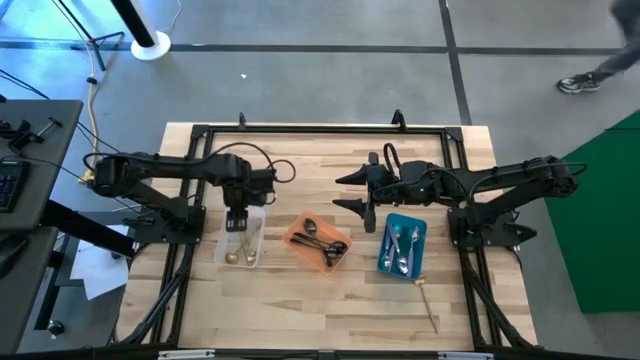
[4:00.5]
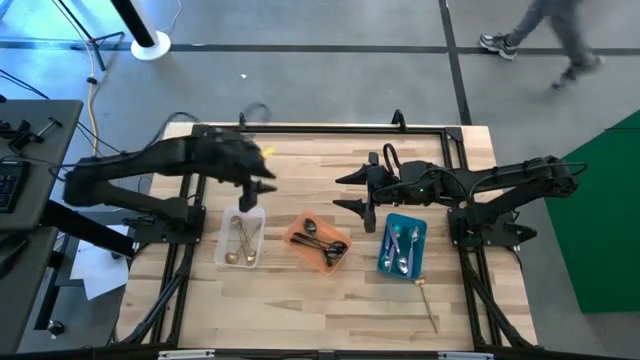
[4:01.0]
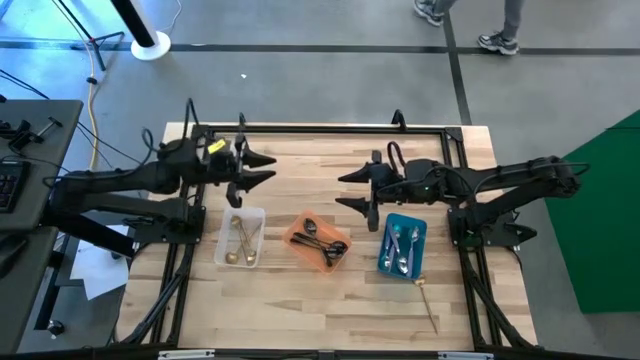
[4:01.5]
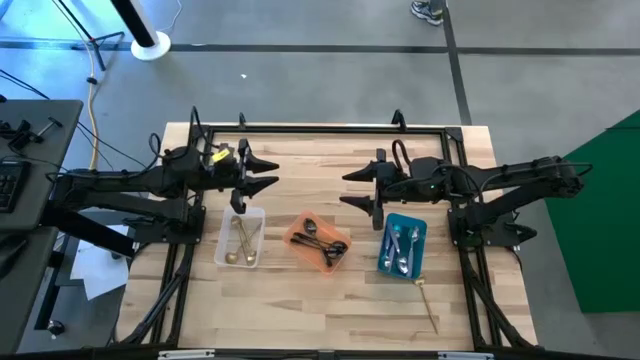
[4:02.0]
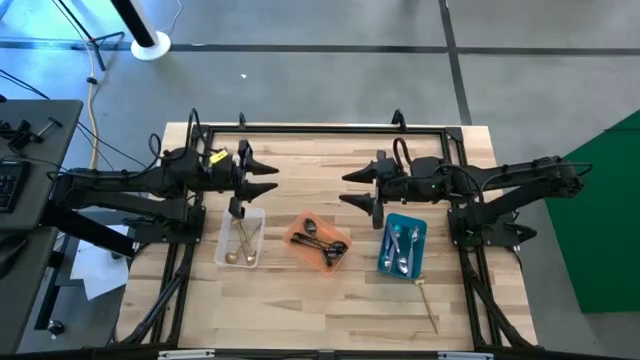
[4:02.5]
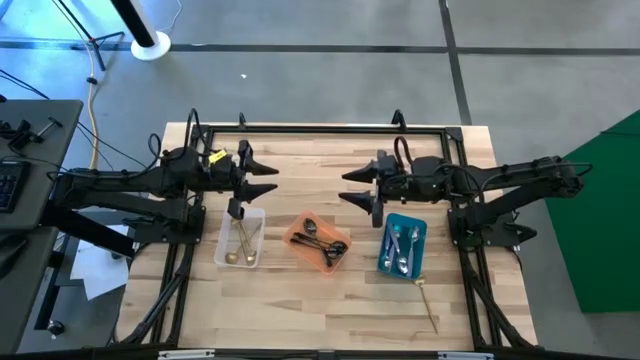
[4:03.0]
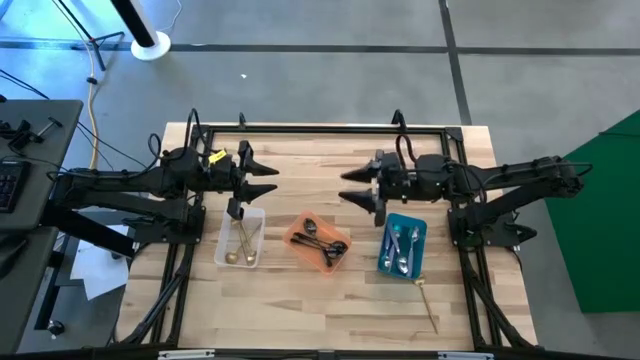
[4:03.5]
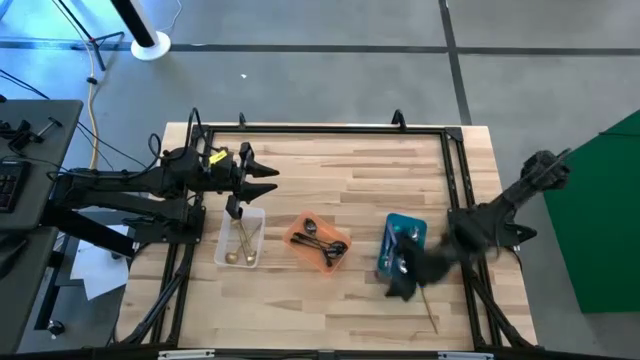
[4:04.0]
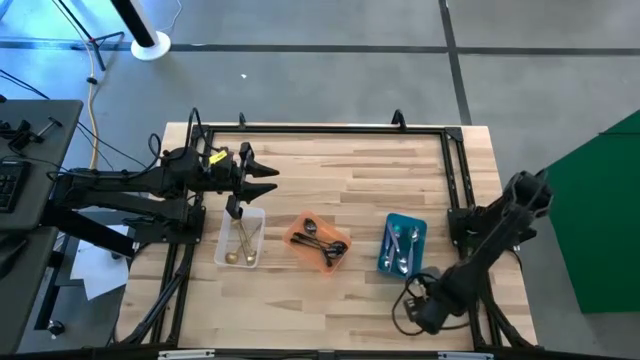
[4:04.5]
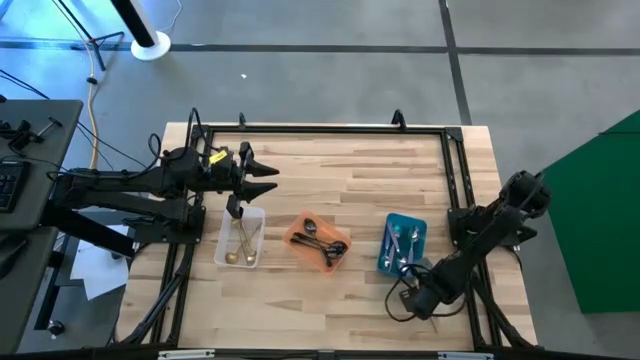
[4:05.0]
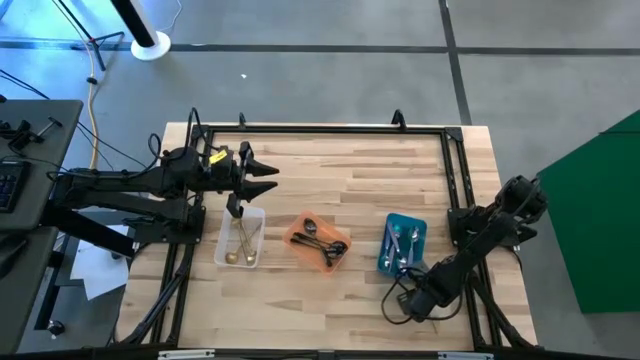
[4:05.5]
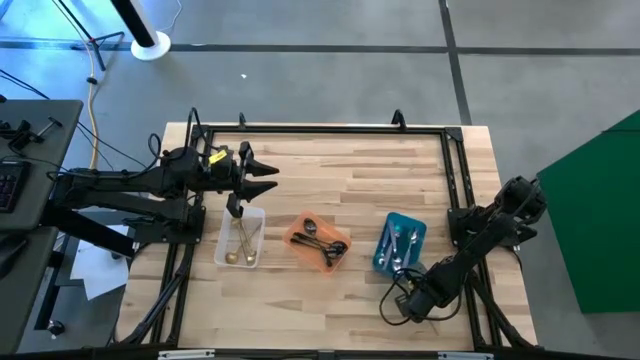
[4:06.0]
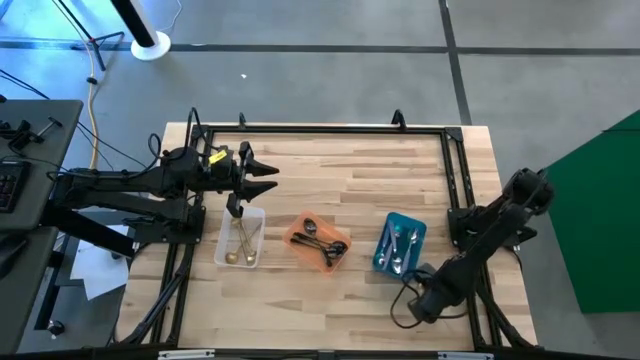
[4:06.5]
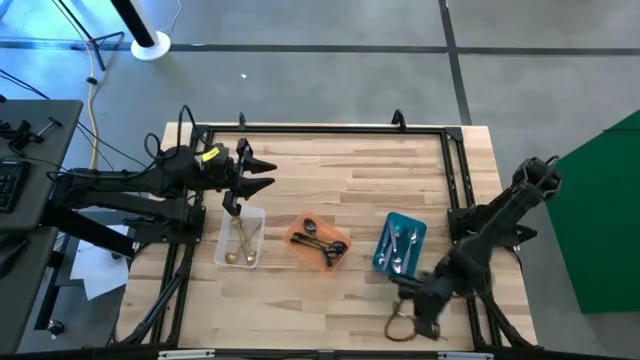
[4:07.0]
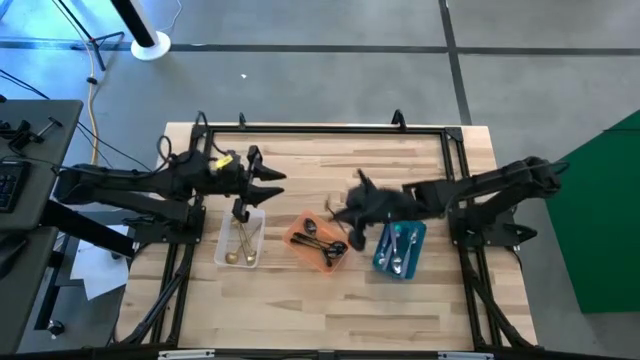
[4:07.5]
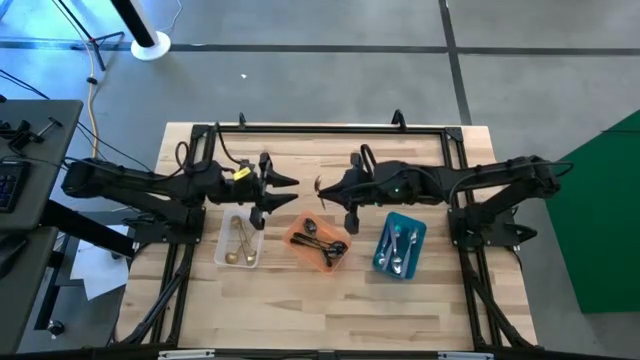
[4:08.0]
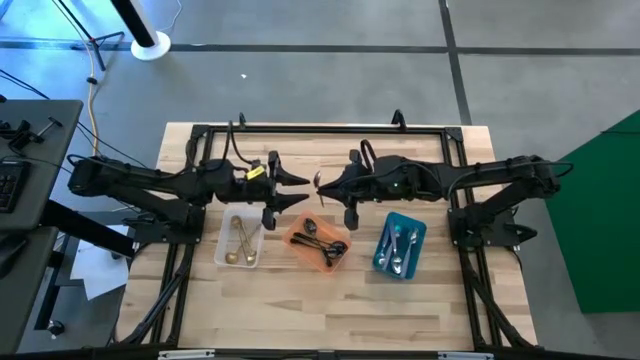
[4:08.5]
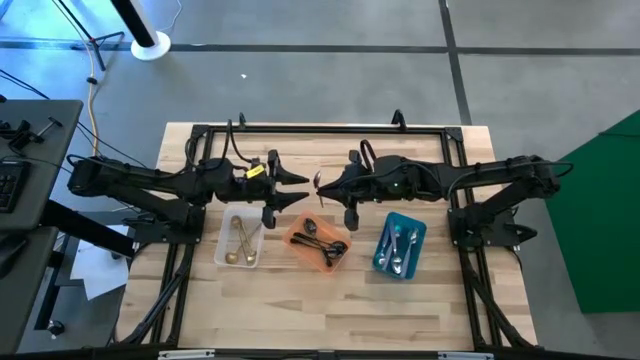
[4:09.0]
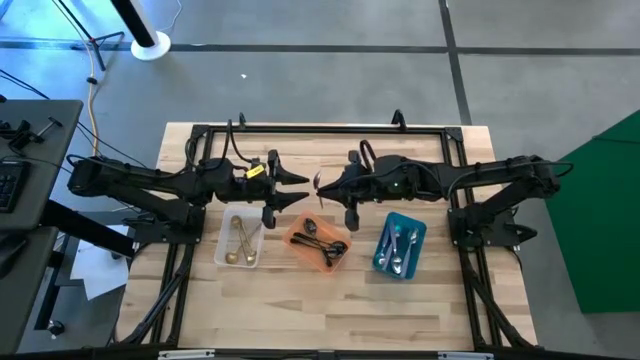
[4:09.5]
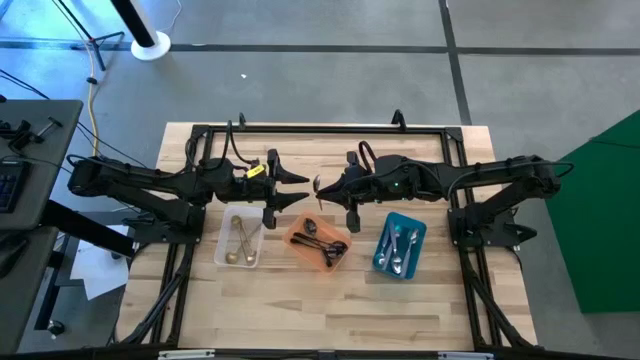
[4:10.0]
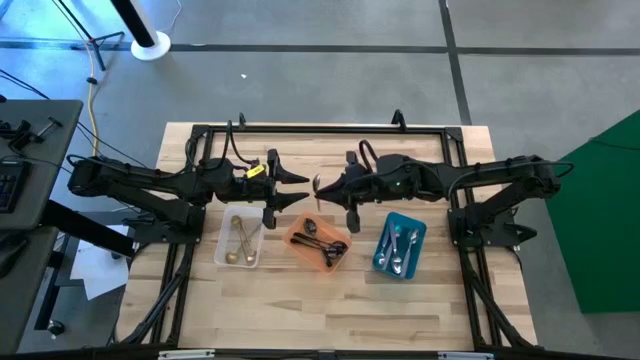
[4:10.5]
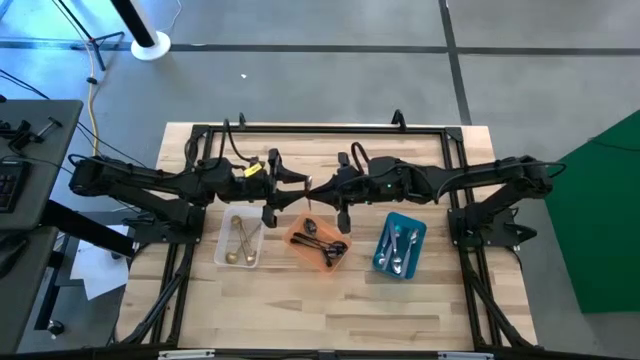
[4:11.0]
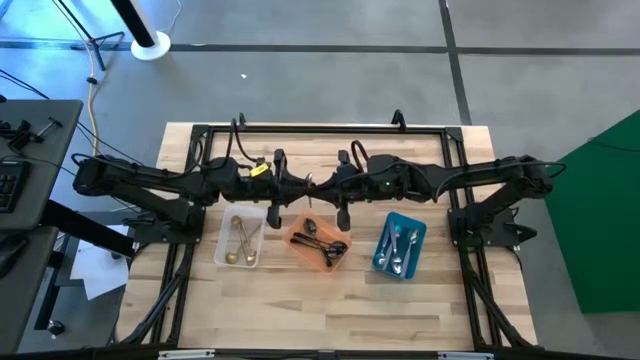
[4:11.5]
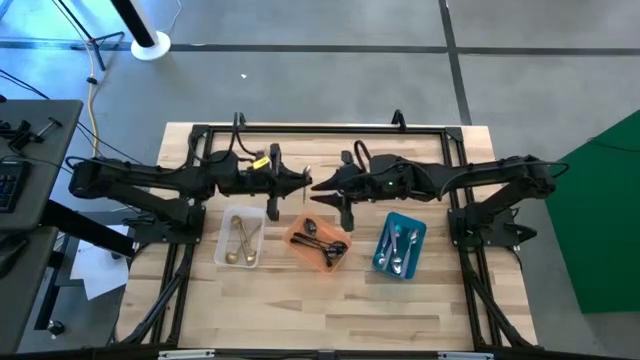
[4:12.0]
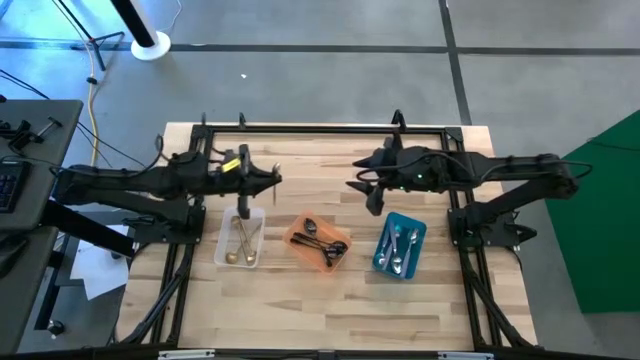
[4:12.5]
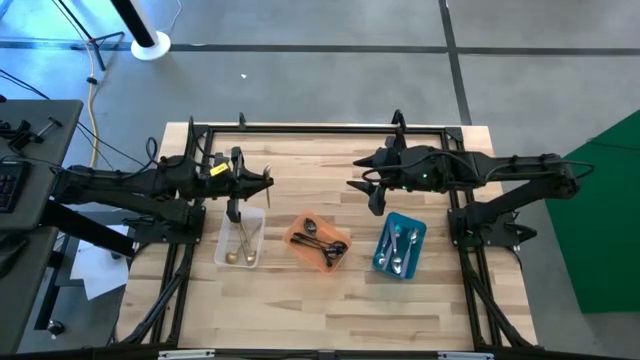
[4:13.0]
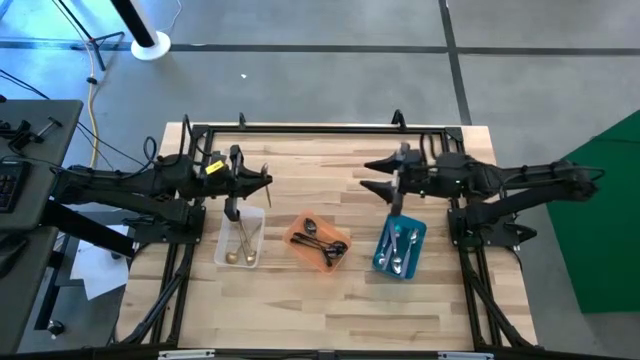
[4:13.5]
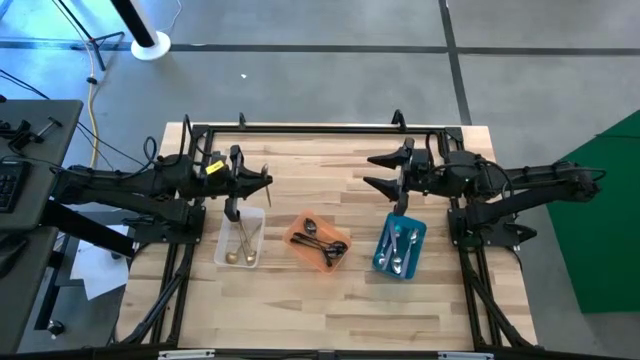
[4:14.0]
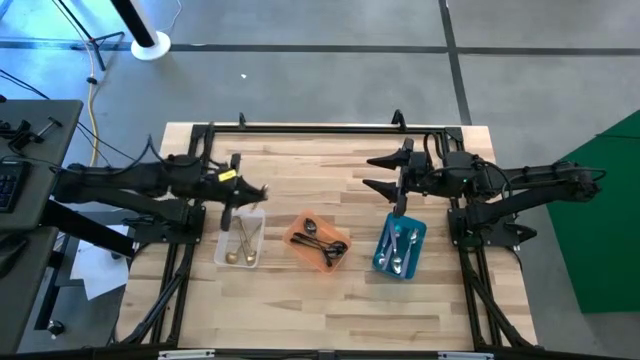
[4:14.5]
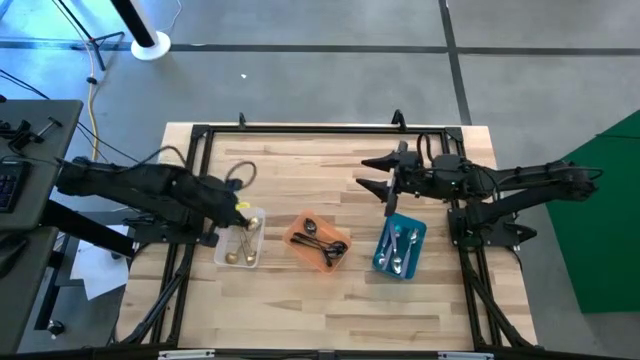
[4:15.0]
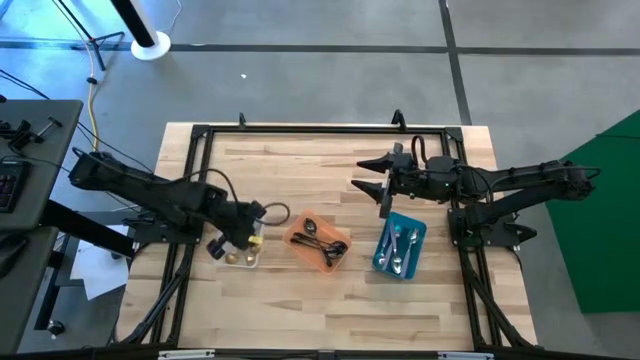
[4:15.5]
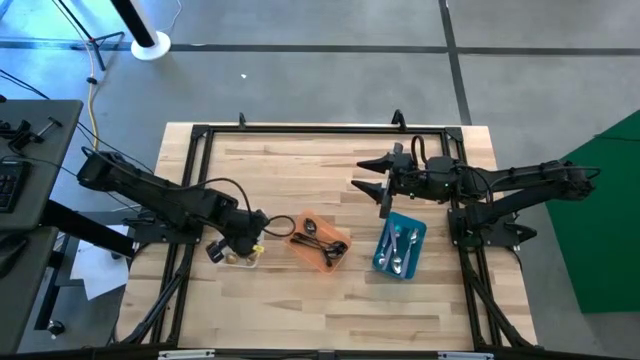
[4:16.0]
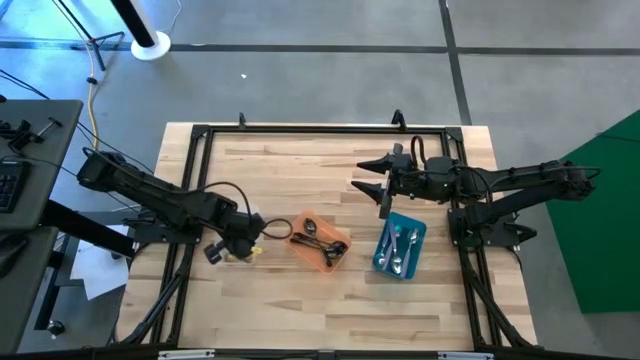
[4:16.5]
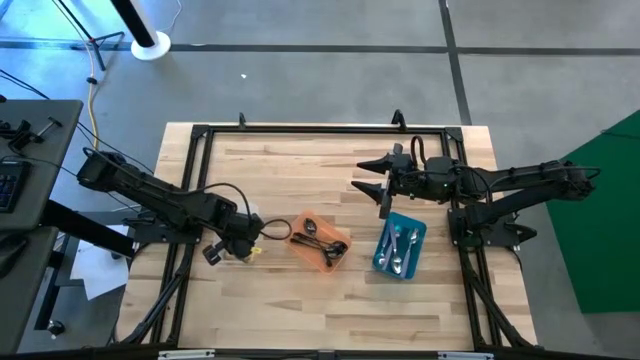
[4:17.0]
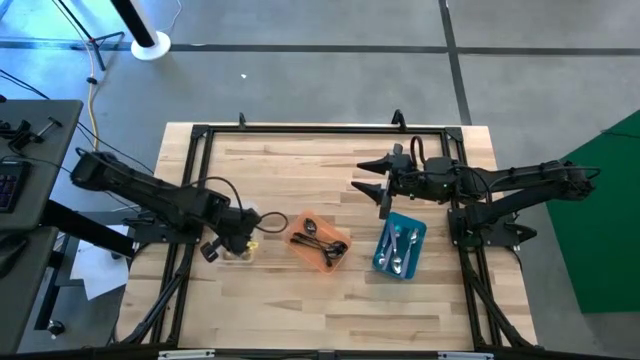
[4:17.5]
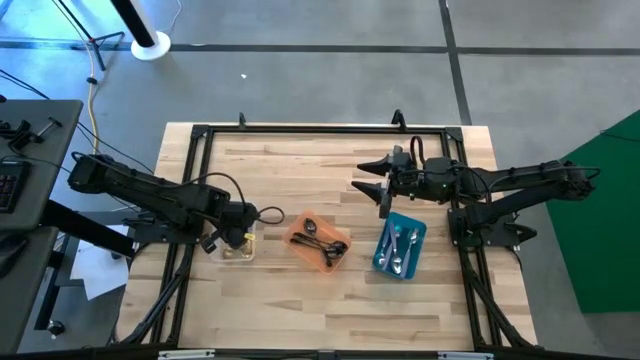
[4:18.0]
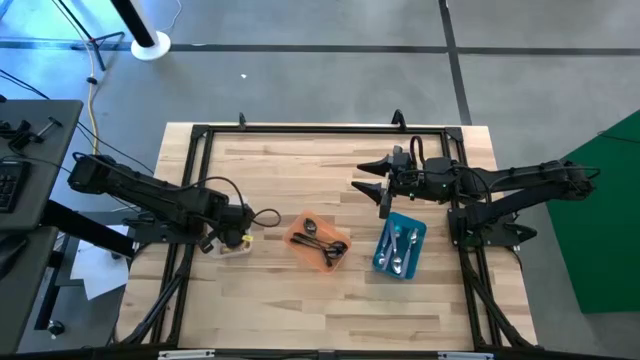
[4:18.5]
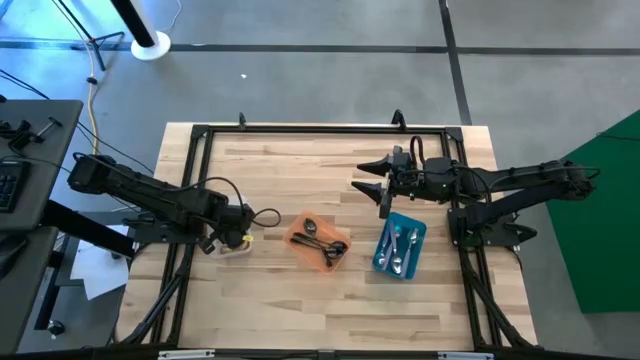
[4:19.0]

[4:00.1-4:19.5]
Task: Sort silverware by color (type)
Put the gold spoon into the transparent bin
